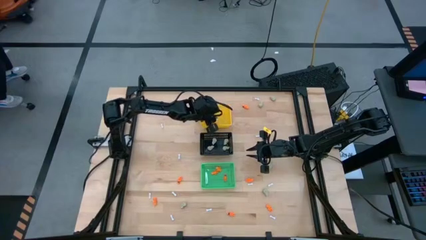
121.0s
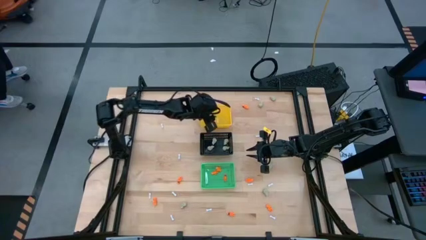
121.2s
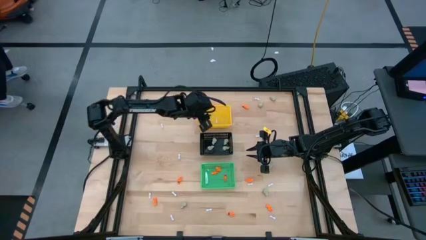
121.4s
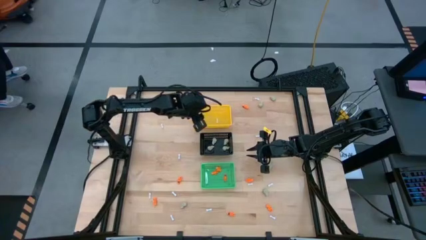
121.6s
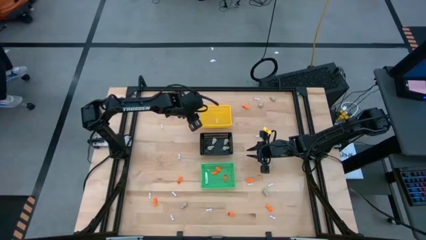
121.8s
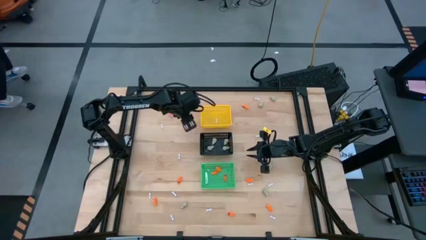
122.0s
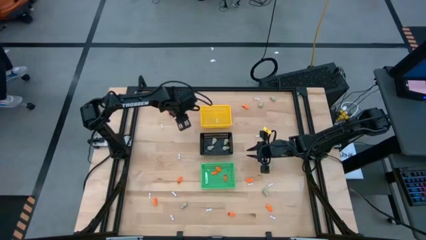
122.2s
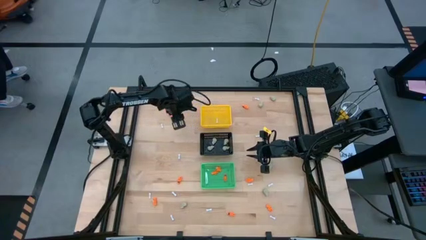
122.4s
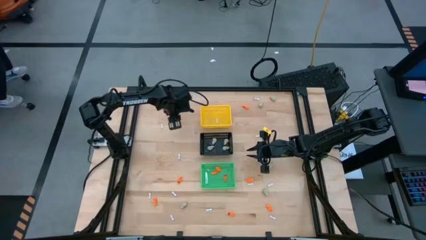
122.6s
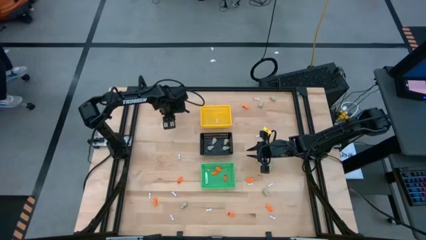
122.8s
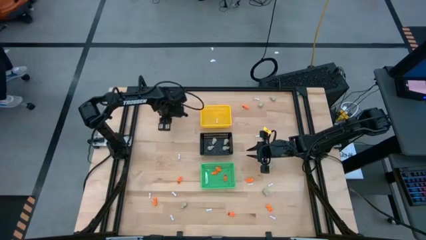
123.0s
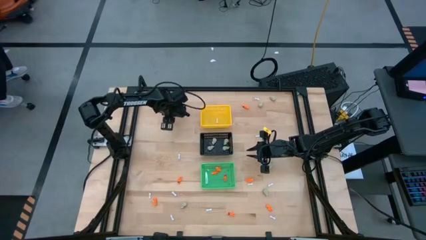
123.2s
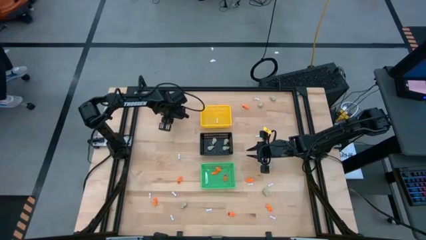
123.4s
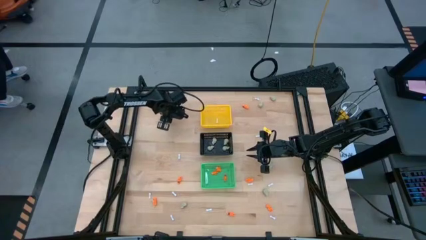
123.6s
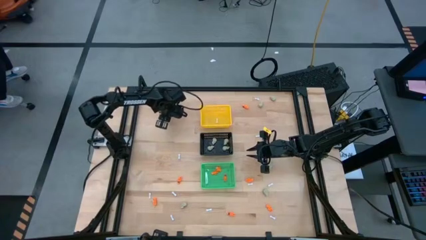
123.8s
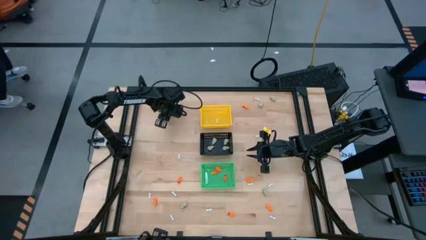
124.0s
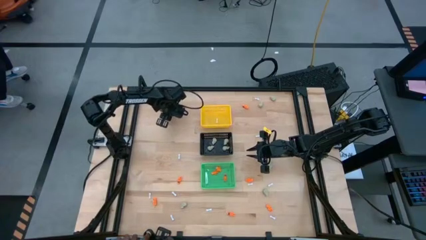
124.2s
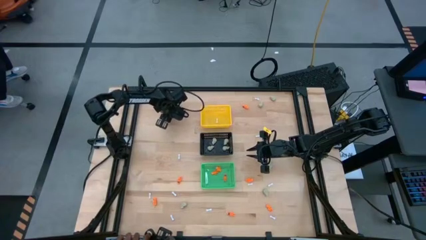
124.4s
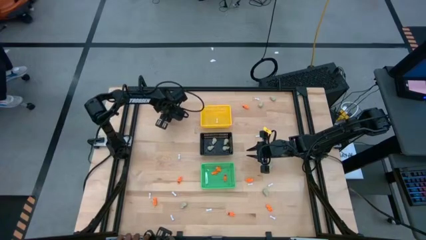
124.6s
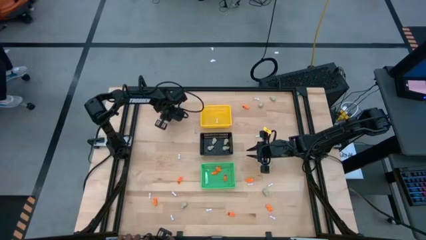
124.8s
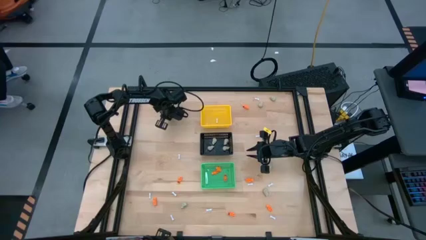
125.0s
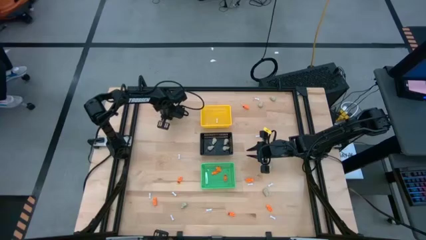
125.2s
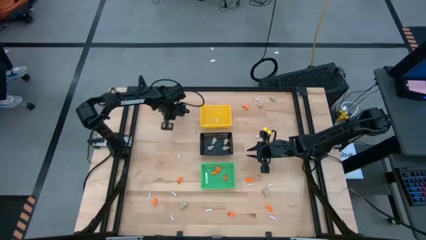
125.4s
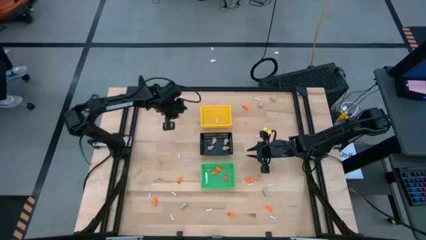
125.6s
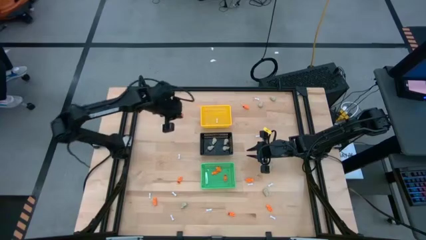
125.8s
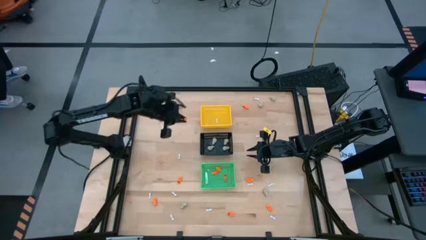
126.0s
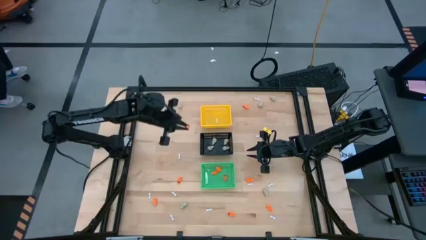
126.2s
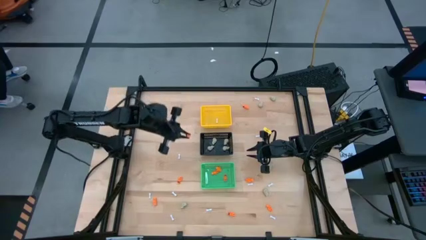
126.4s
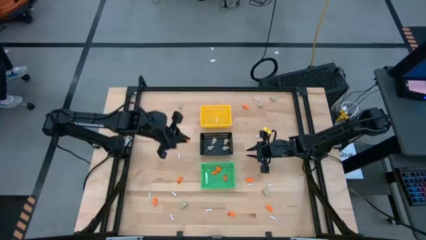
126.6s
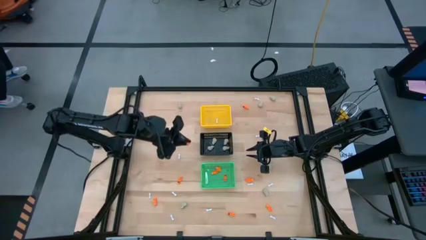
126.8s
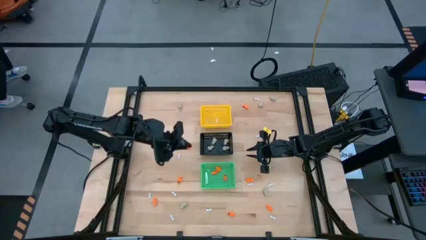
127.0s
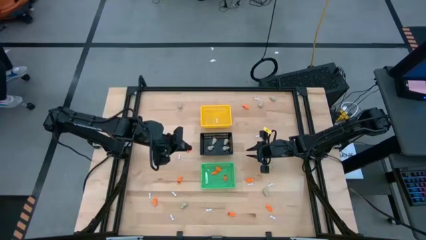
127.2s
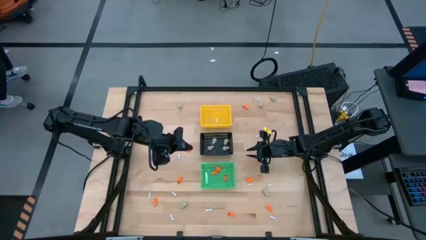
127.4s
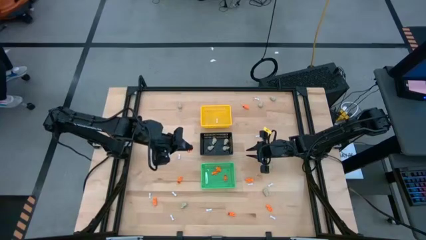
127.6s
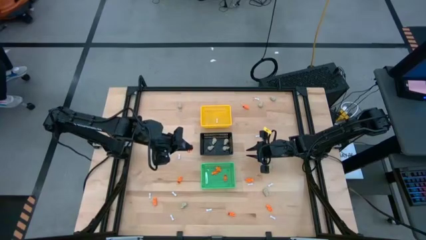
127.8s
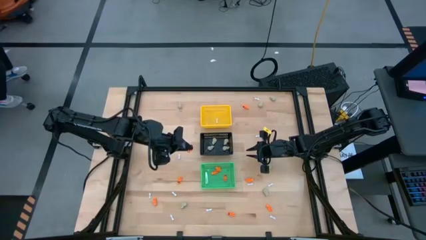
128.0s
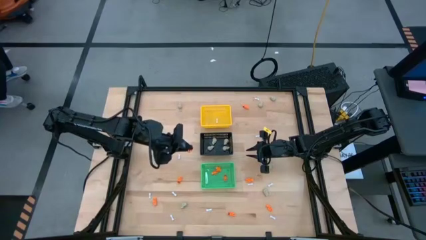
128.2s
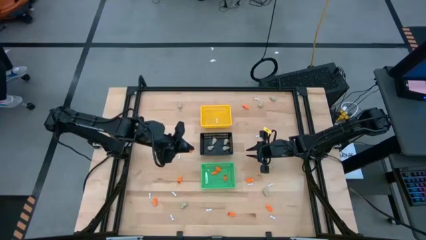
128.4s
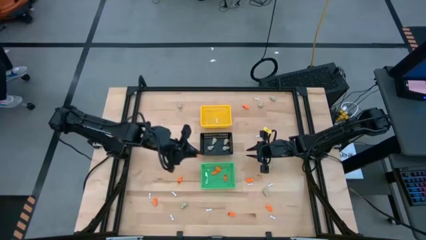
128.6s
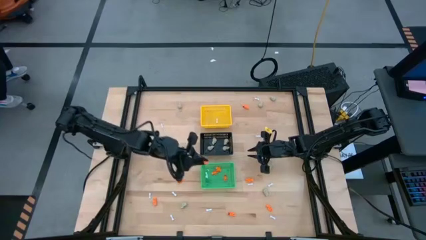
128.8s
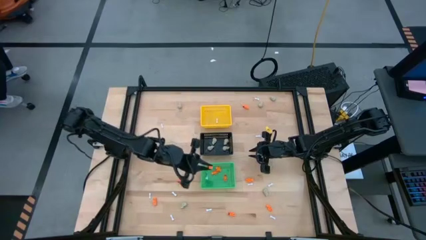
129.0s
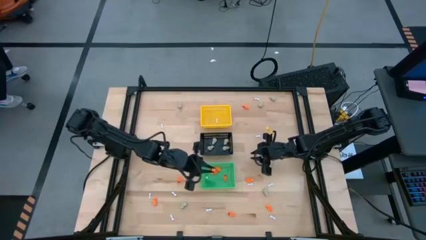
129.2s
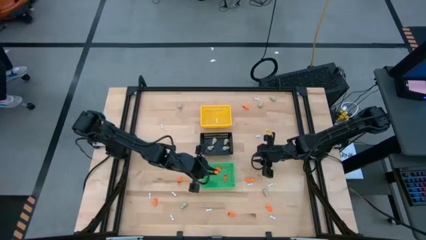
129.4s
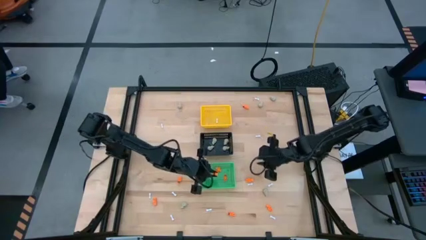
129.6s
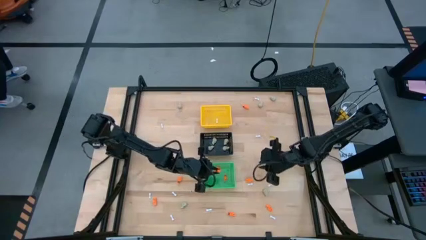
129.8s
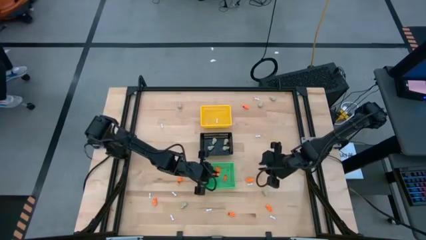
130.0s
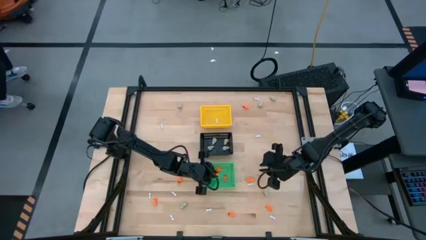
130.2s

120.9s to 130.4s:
Task: Sort Halloween decoration
Put the orange skeleton toy into the green basket

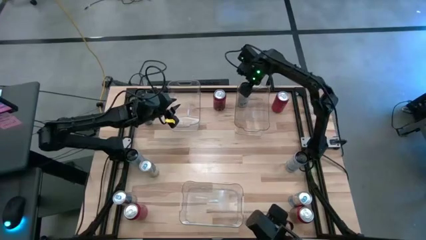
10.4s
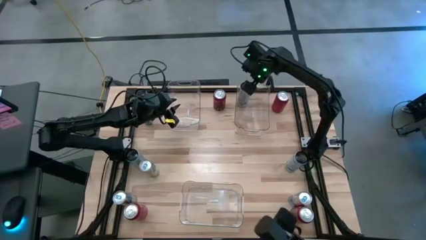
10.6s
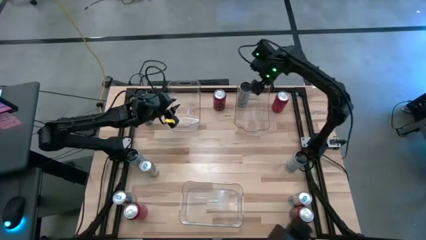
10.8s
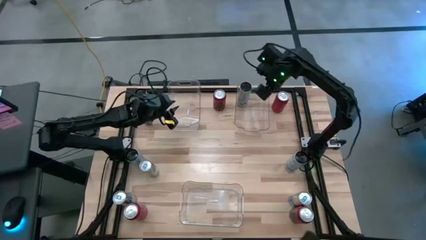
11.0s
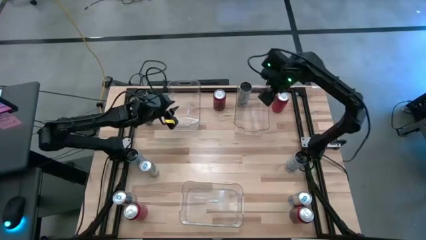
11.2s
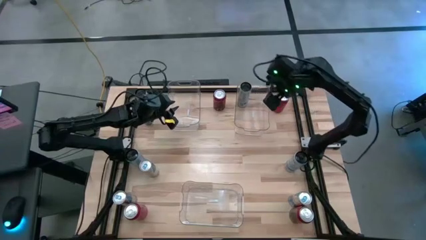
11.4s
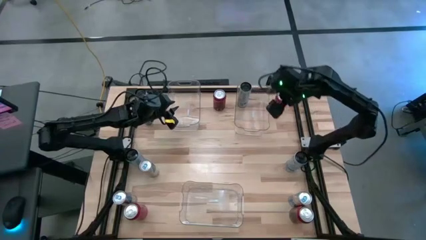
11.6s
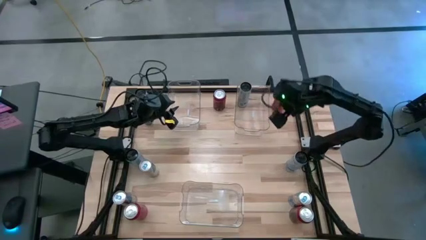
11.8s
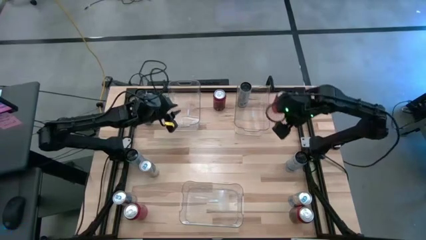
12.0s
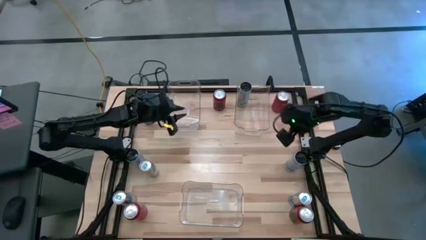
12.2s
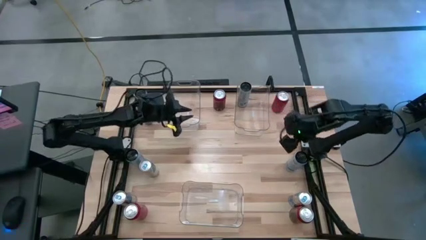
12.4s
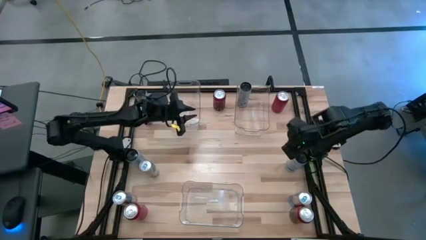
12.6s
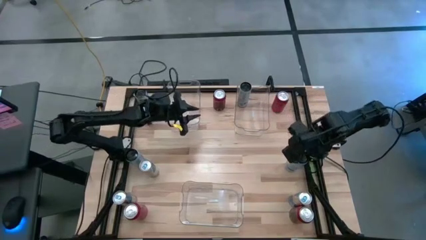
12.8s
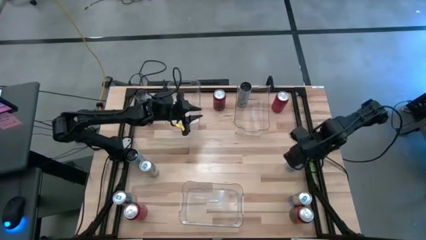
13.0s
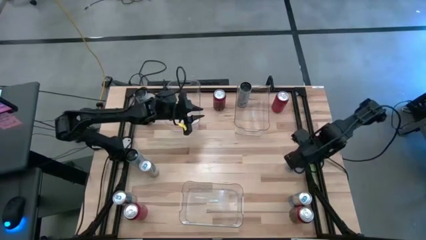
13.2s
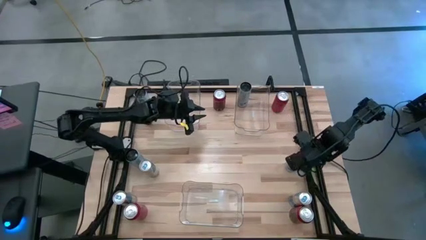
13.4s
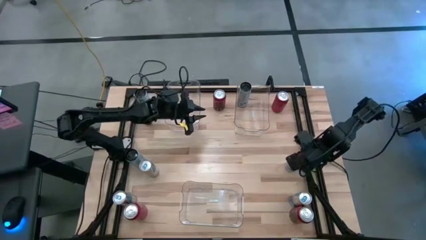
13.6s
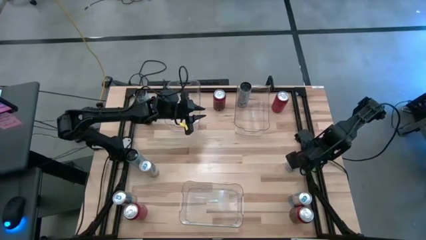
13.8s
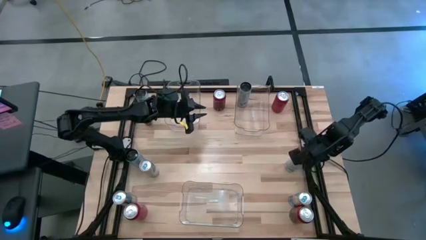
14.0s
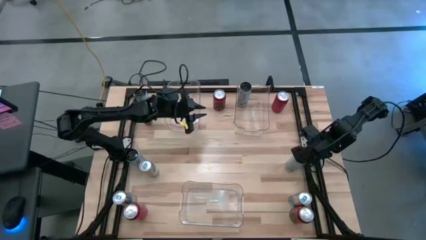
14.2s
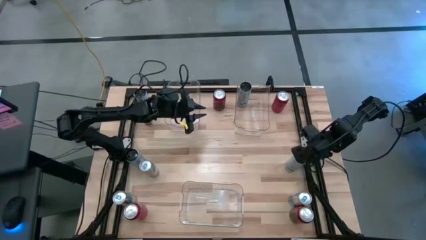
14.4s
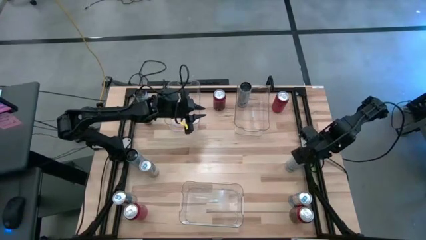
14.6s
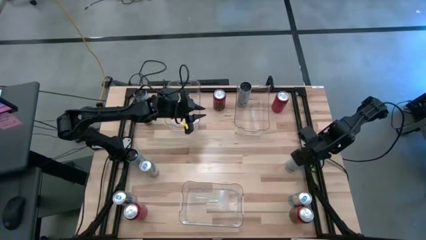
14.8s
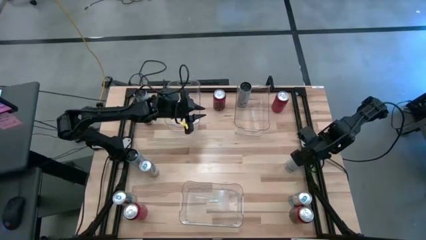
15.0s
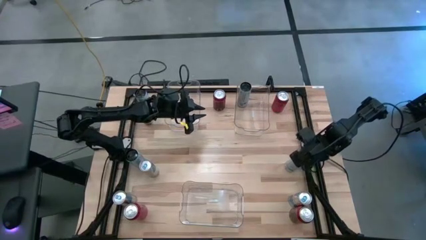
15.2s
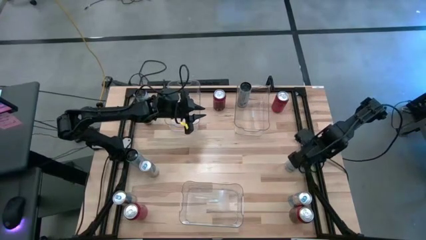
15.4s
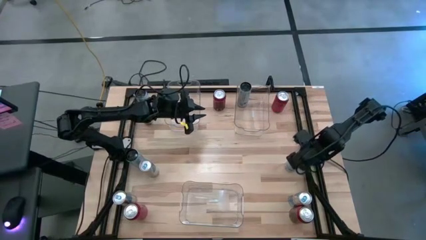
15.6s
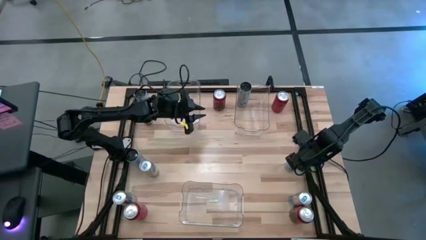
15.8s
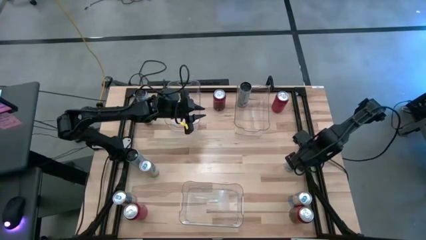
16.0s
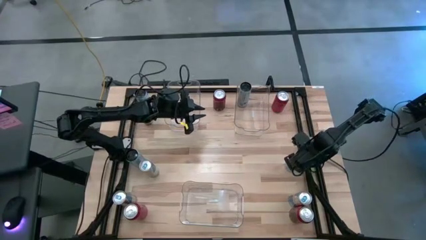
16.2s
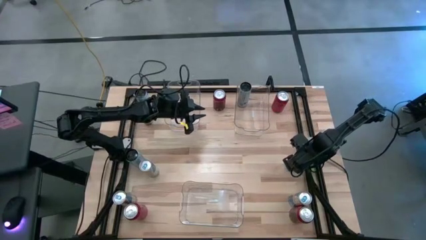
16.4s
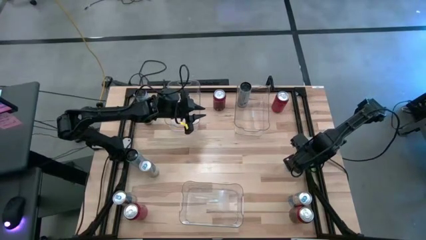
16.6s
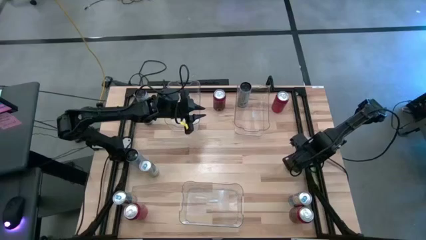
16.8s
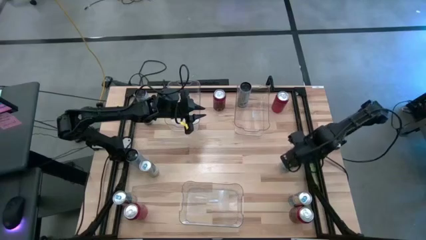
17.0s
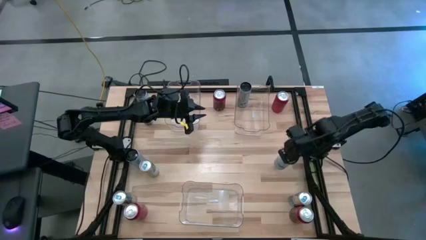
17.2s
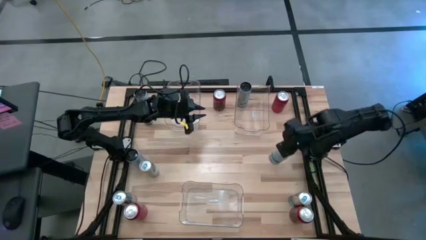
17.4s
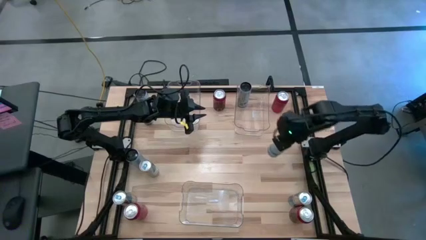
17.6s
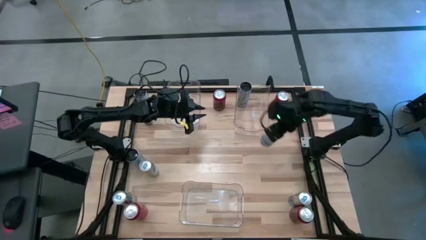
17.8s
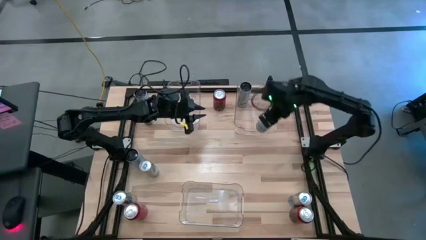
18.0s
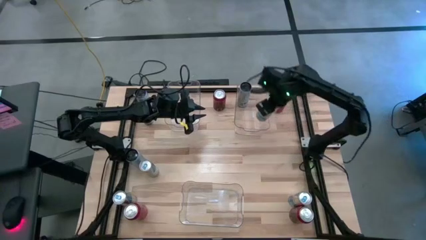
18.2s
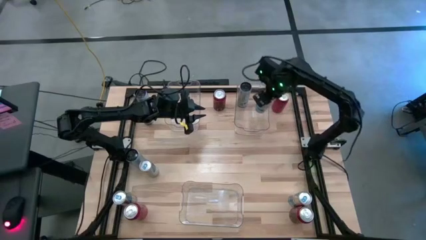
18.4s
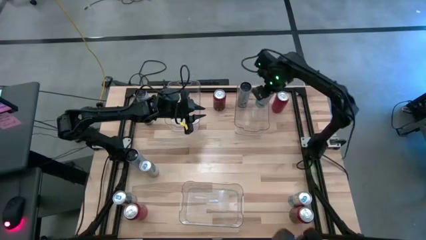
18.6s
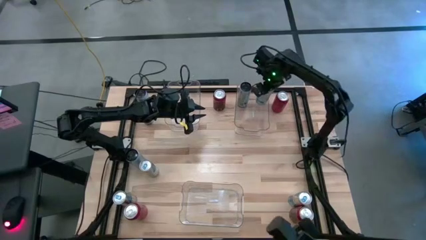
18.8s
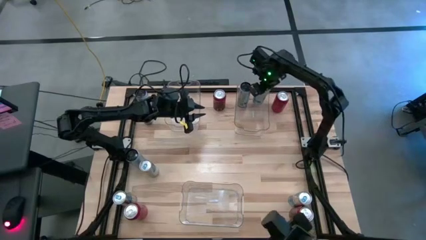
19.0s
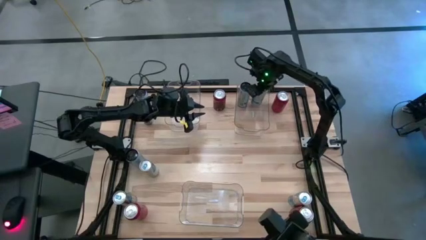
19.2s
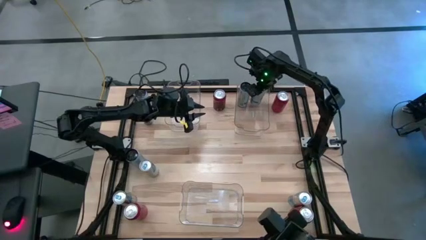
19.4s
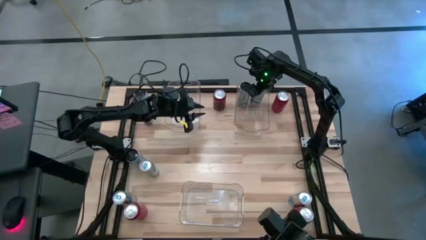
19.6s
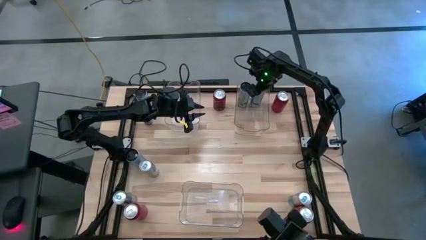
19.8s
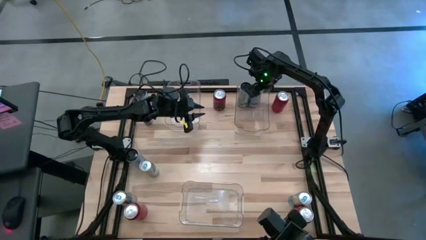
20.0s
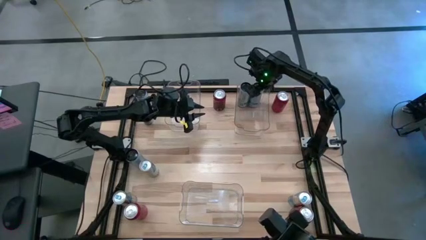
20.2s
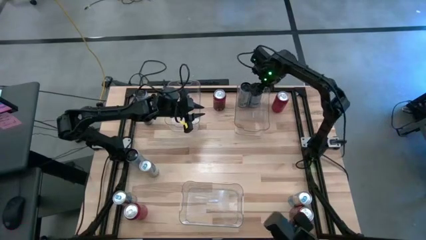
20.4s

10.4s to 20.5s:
Task: Sort soda cans
Put the bottom right white-blue soda can into the top right transparent bin
